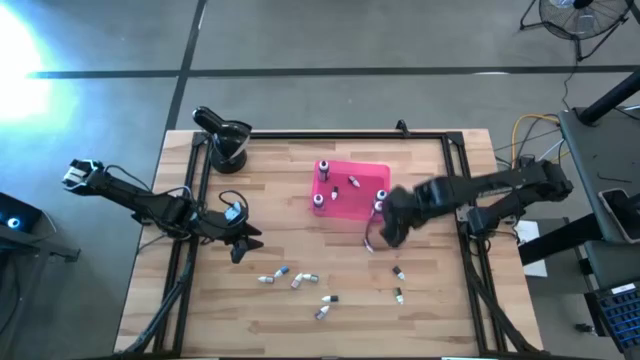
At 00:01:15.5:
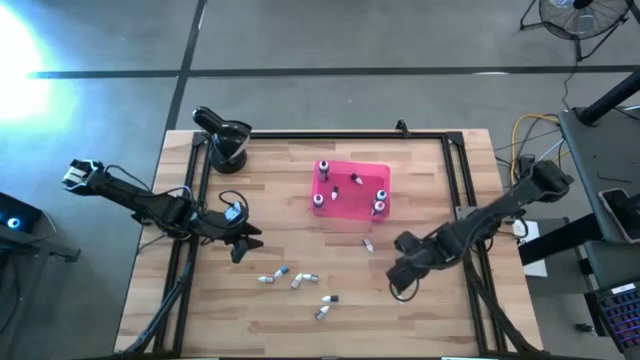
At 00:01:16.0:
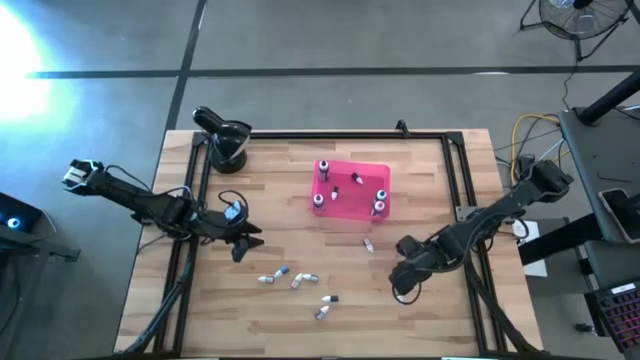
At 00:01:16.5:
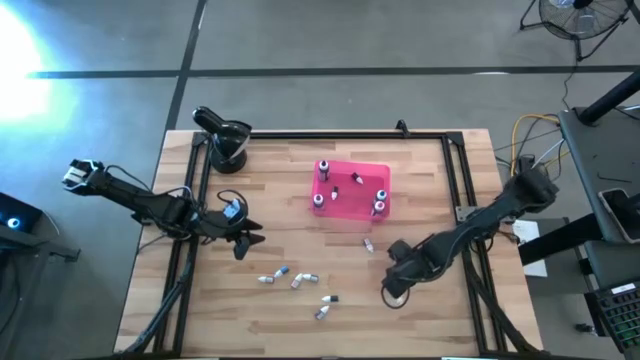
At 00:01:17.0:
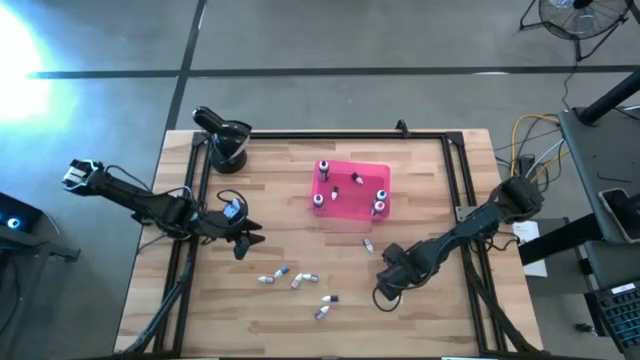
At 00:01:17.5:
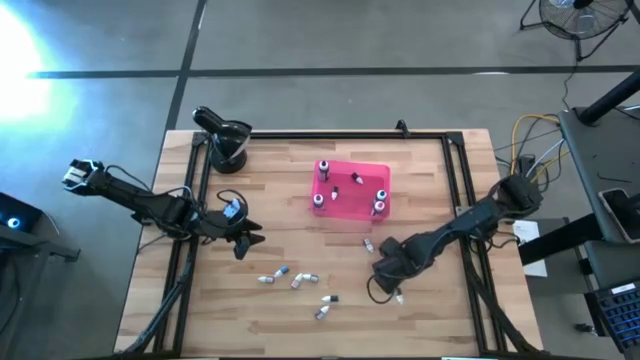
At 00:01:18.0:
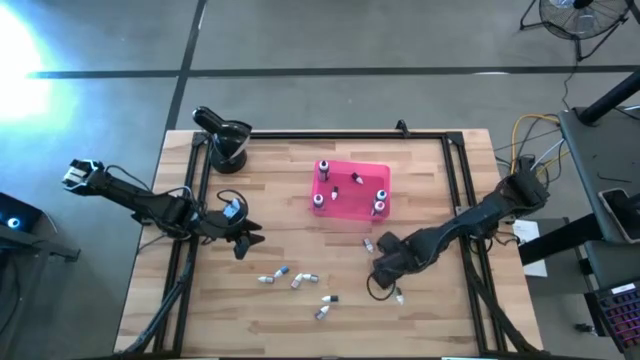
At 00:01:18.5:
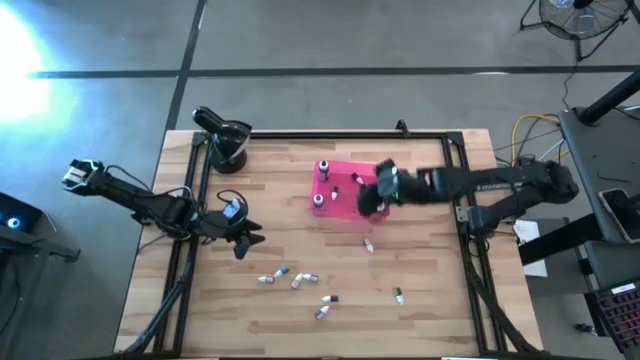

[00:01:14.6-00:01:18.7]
Task: Pick & Place food coloring
Put the right small black food coloring into the pink bin

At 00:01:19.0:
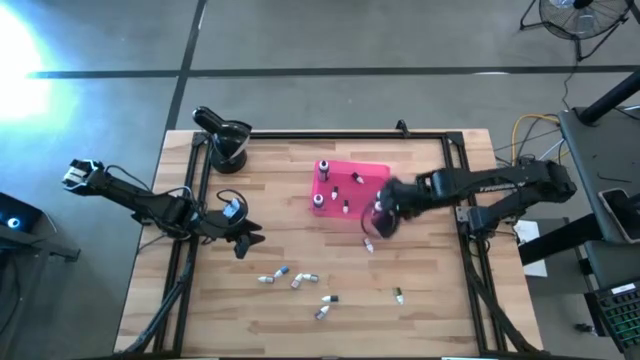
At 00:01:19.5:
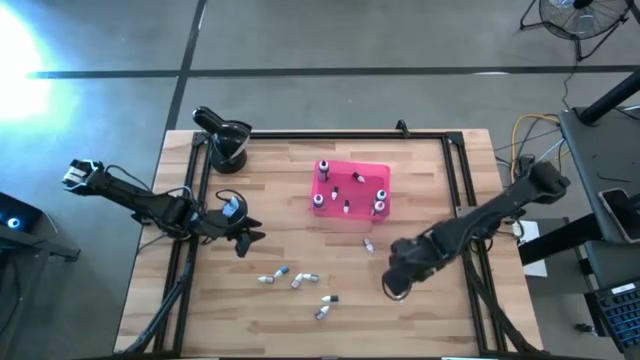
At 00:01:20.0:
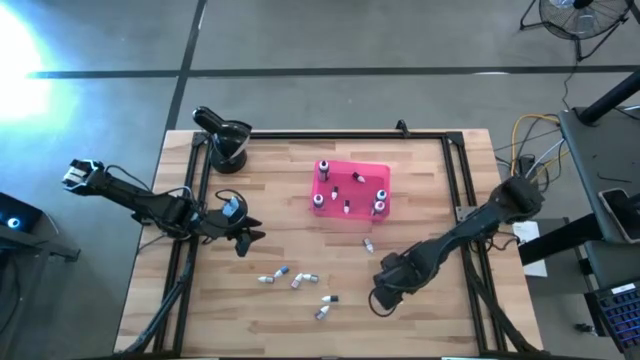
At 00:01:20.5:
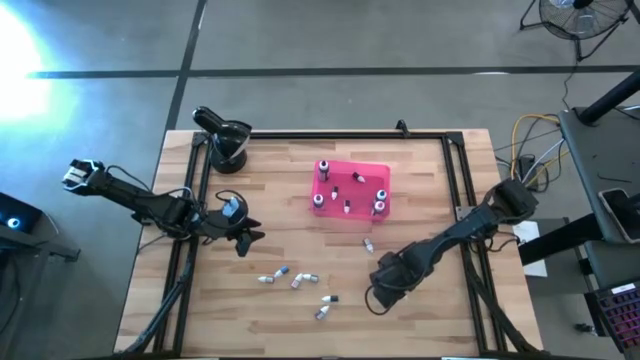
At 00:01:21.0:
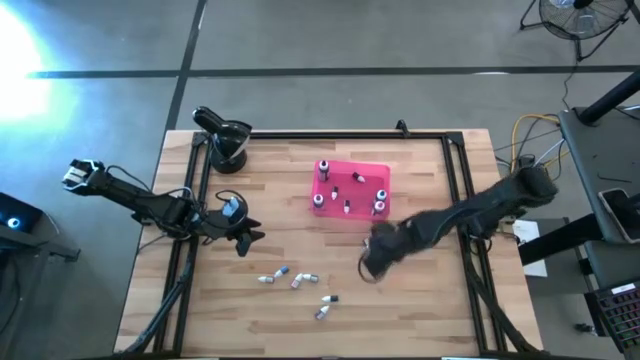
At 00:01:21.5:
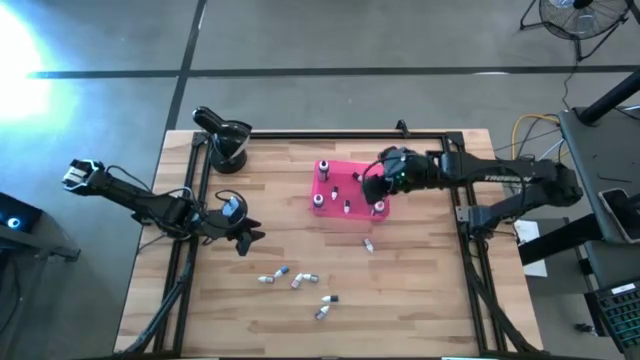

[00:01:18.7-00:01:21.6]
Put the small green food coloring into the pink bin

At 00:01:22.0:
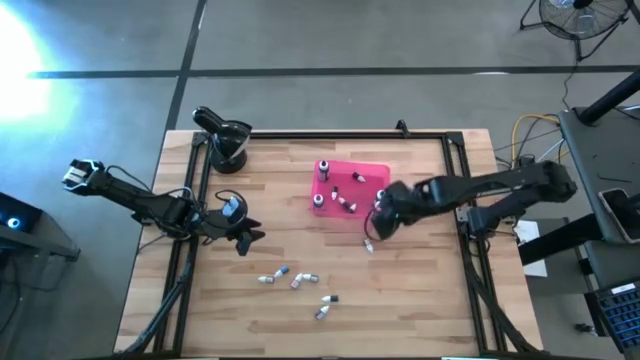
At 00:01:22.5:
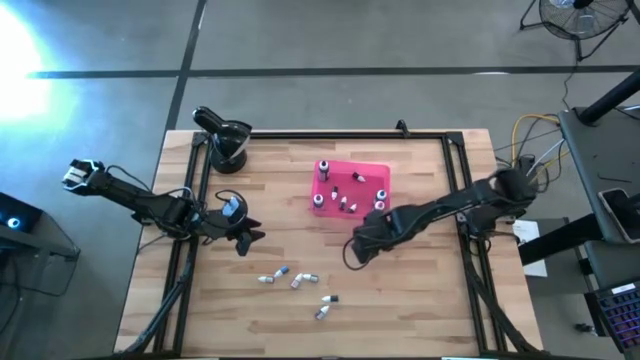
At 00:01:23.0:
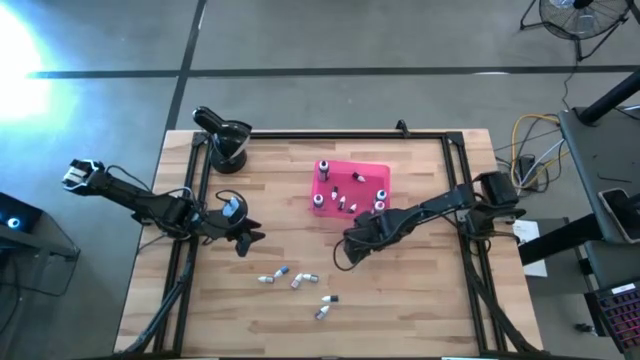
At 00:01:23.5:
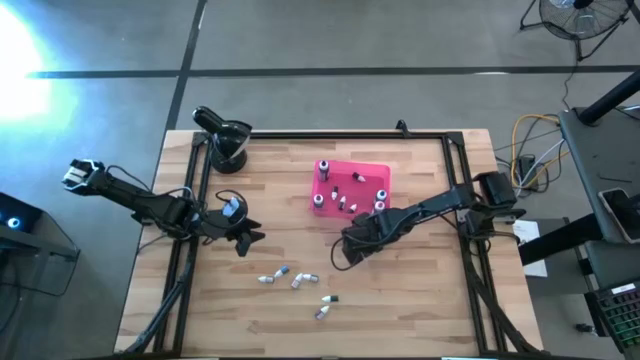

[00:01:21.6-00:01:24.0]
Put the top small red food coloring into the pink bin

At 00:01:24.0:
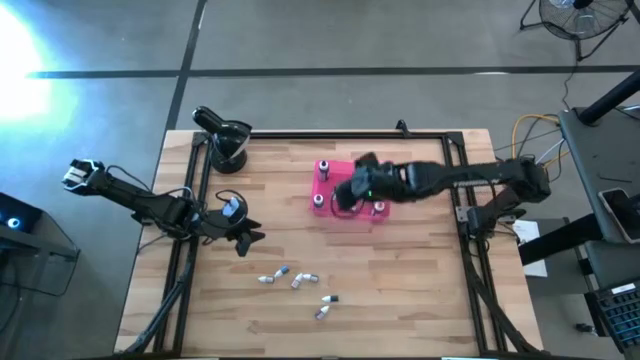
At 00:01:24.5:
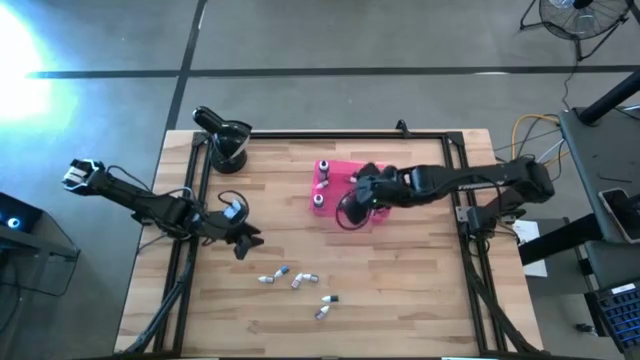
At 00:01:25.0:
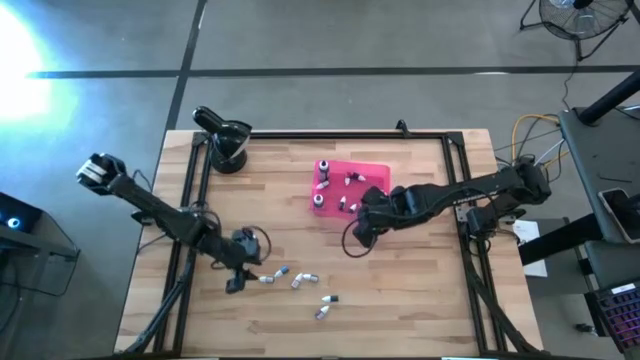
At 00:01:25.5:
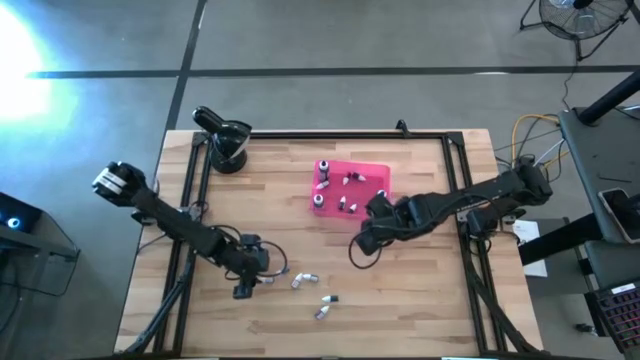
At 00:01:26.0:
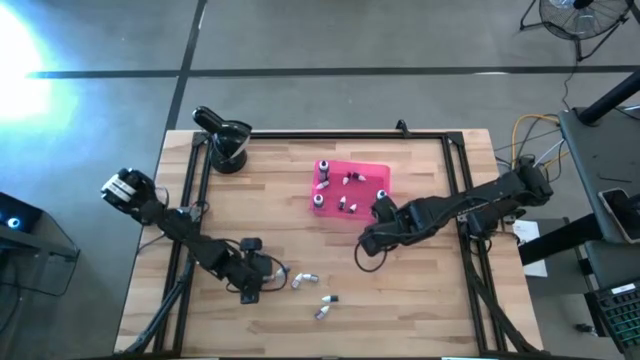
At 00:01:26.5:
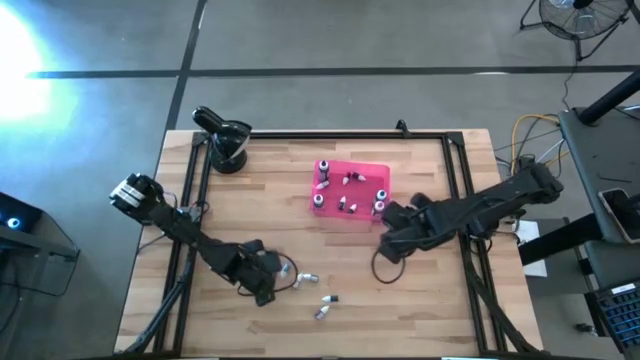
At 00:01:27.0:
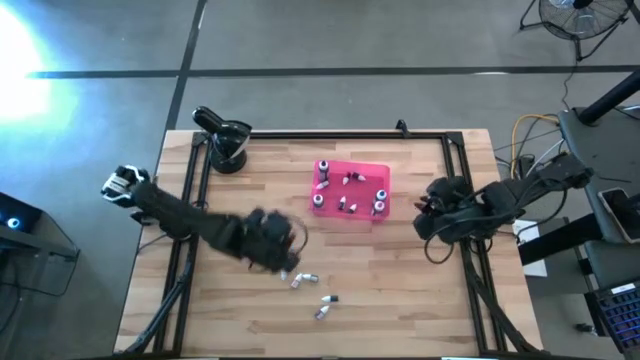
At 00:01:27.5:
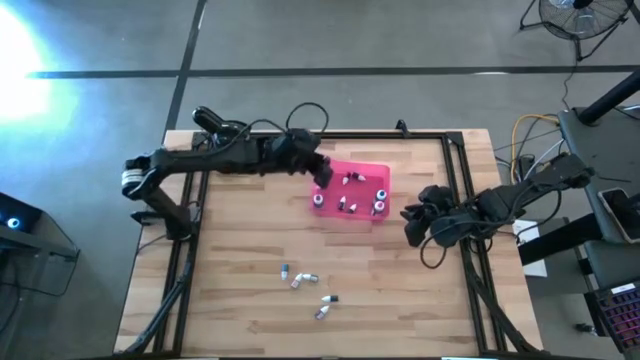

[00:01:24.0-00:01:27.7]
Put the small orange food coloring into the pink bin

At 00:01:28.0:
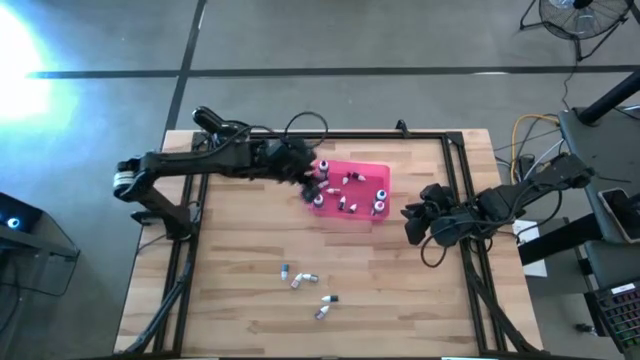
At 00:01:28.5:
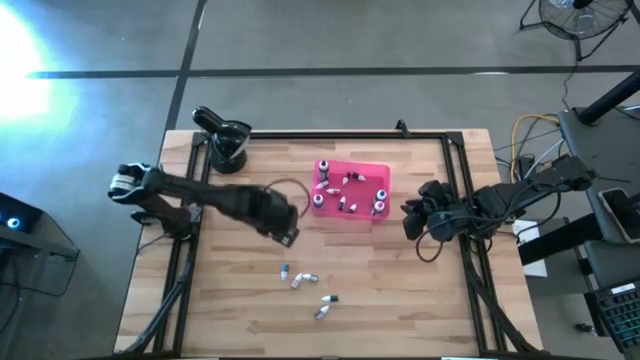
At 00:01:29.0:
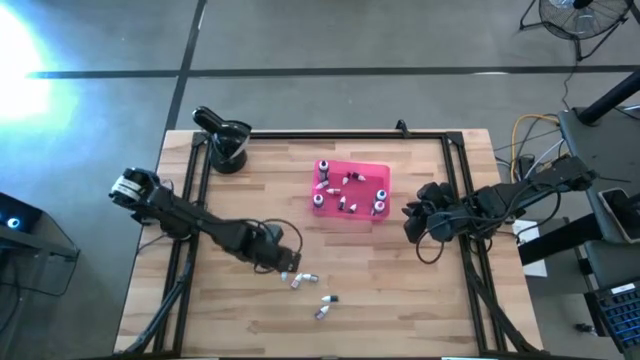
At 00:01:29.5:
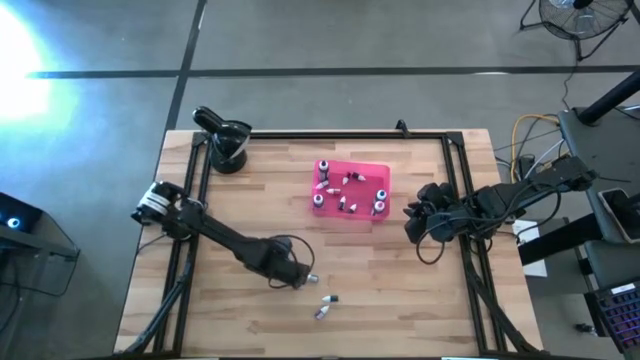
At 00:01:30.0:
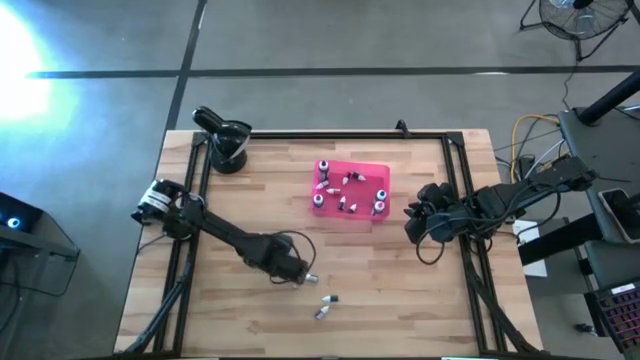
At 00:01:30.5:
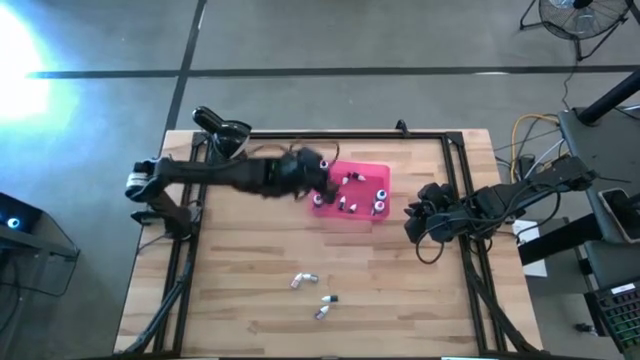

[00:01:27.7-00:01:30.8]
Put the small blue food coloring into the pink bin

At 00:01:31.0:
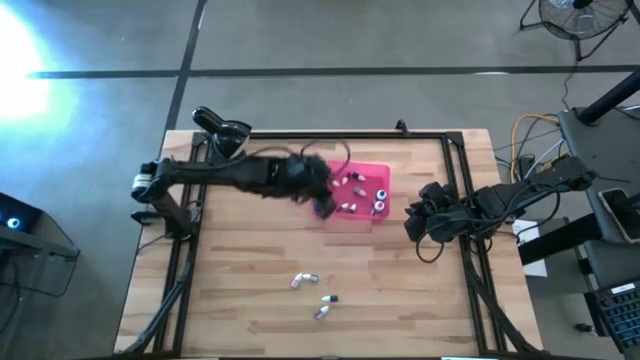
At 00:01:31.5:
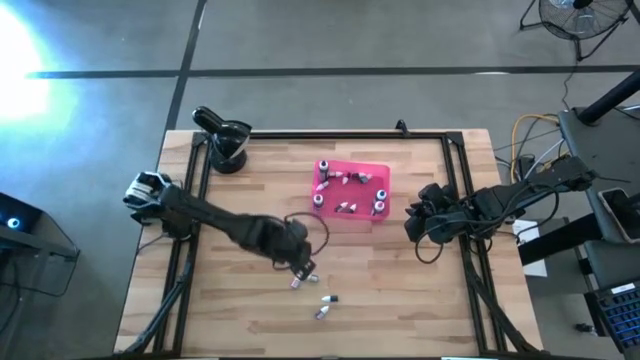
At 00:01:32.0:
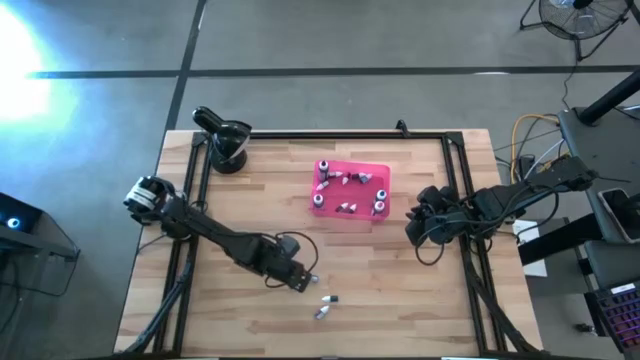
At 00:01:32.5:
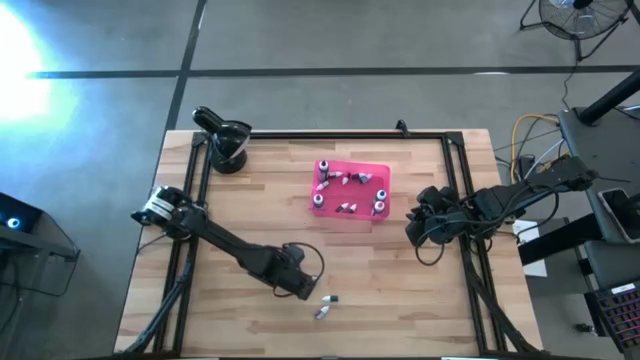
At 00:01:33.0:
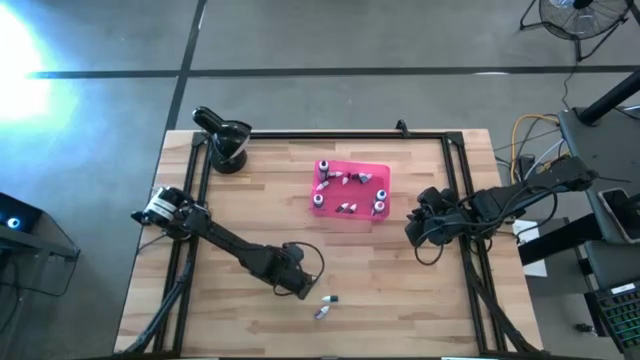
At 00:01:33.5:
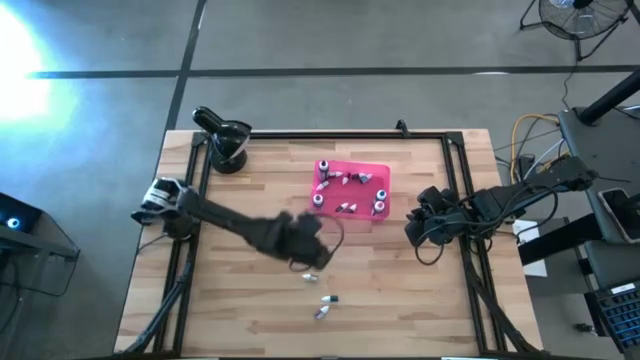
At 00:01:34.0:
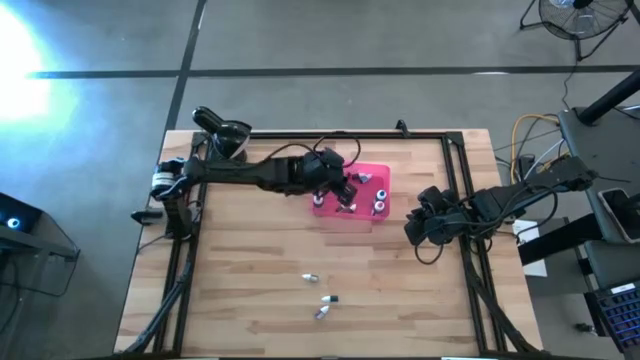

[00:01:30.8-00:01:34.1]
Put the small red food coloring into the pink bin

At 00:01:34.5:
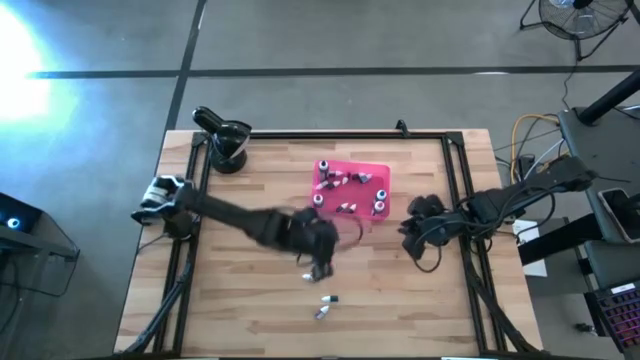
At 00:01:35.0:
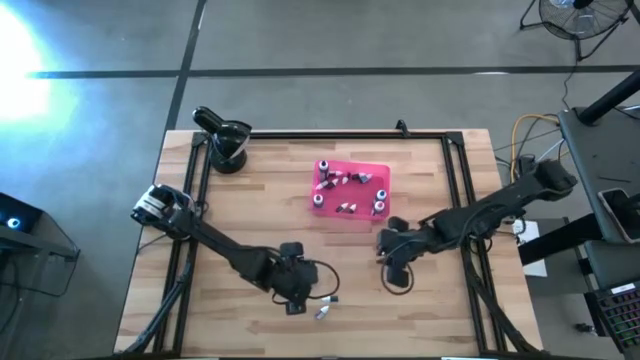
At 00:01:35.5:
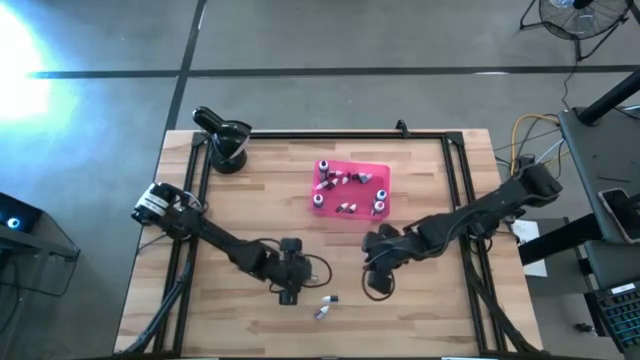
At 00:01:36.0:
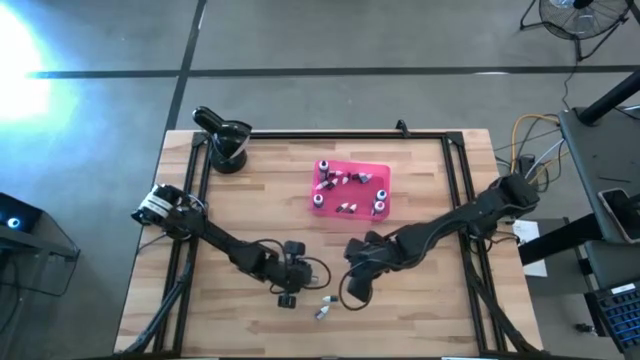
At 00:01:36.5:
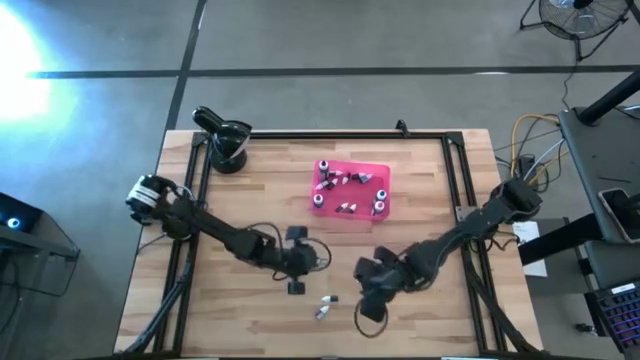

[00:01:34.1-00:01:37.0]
Put the small black food coloring into the pink bin
